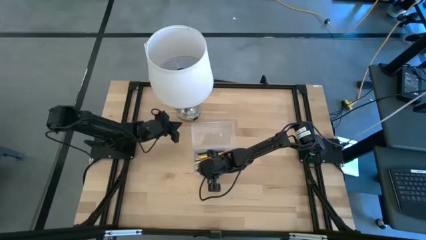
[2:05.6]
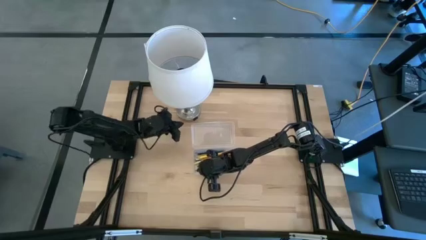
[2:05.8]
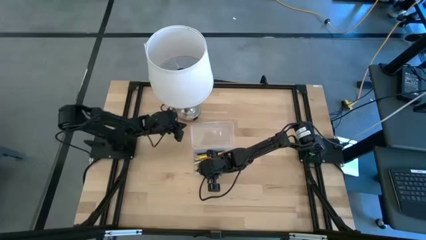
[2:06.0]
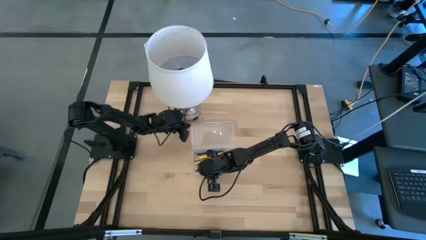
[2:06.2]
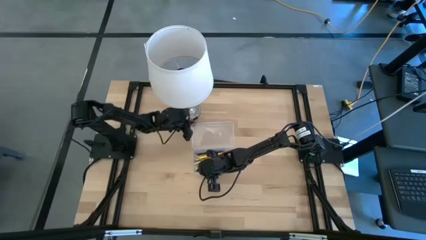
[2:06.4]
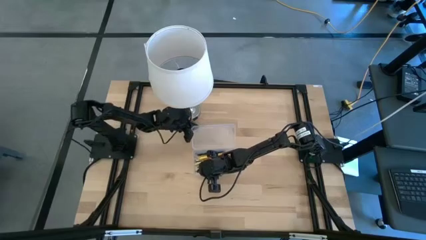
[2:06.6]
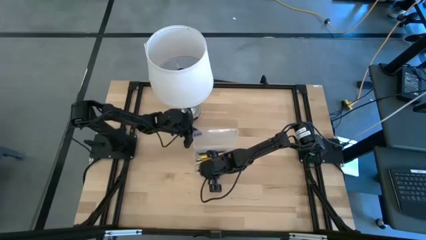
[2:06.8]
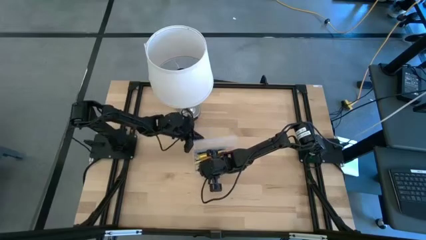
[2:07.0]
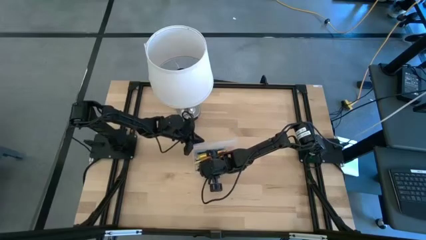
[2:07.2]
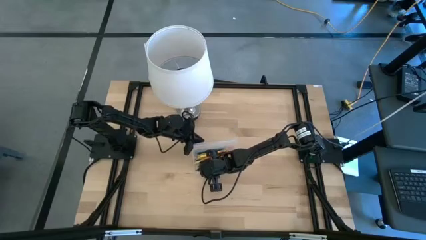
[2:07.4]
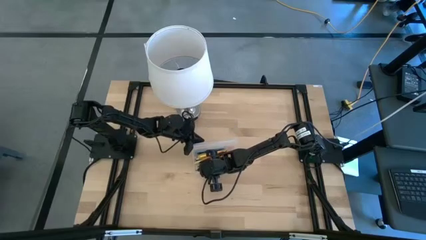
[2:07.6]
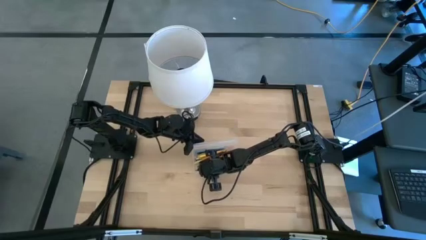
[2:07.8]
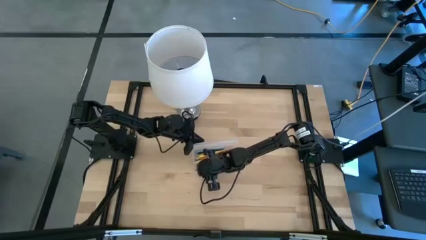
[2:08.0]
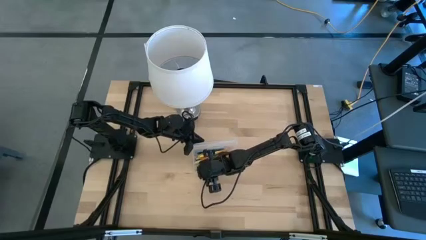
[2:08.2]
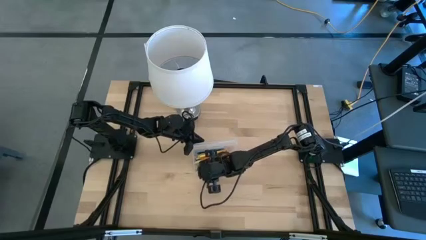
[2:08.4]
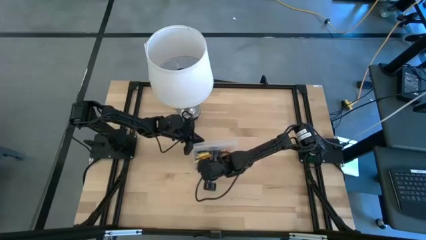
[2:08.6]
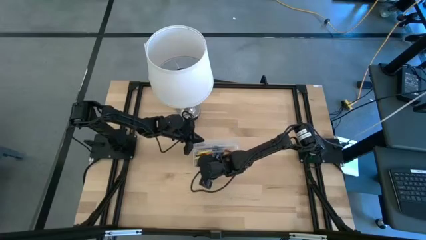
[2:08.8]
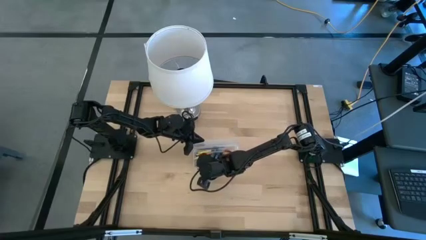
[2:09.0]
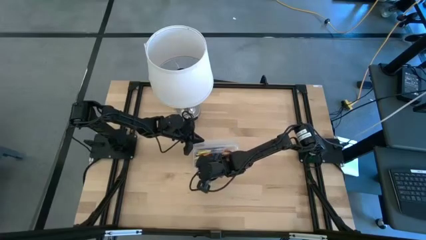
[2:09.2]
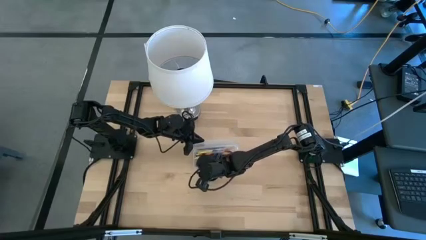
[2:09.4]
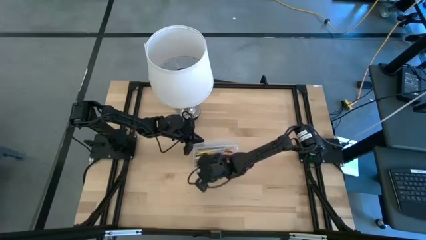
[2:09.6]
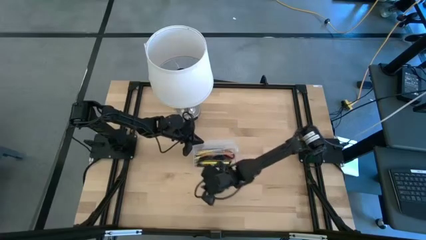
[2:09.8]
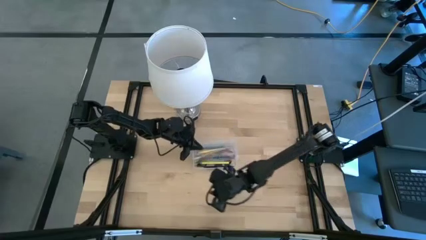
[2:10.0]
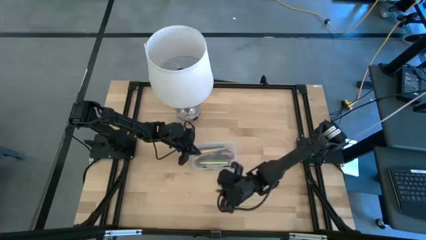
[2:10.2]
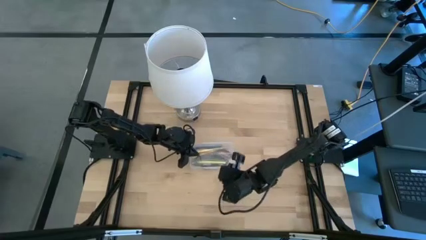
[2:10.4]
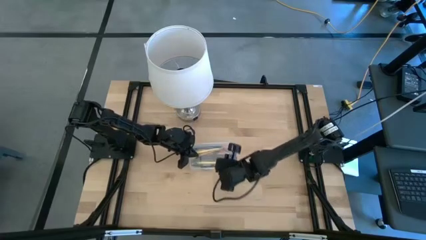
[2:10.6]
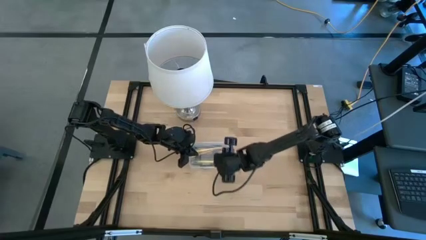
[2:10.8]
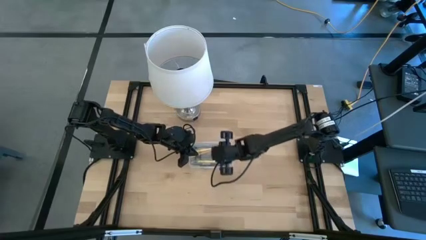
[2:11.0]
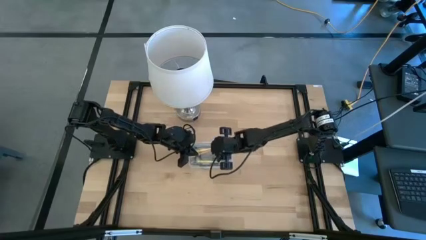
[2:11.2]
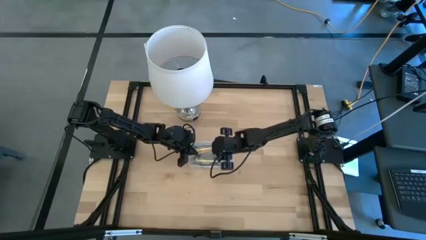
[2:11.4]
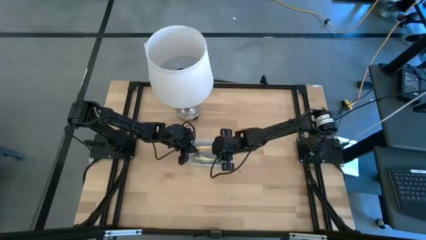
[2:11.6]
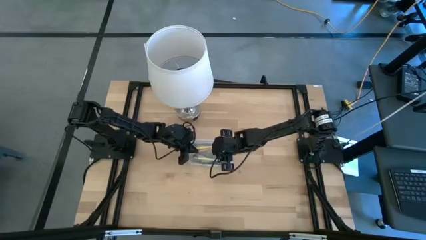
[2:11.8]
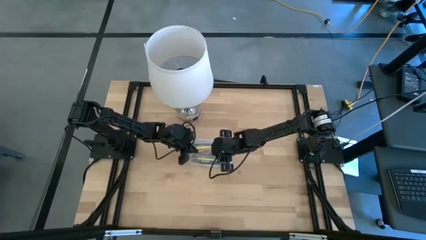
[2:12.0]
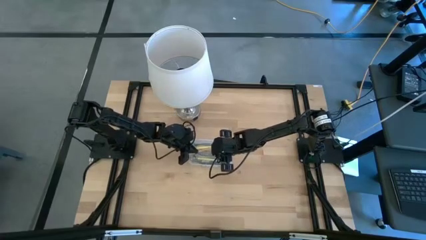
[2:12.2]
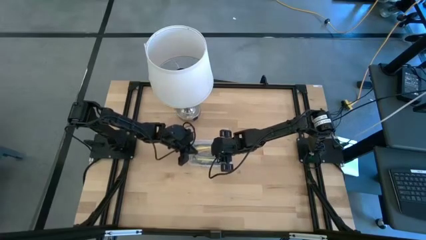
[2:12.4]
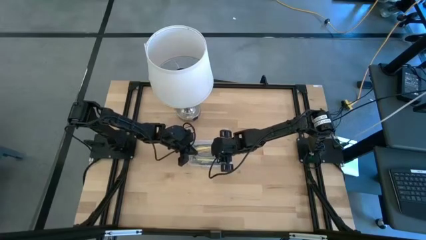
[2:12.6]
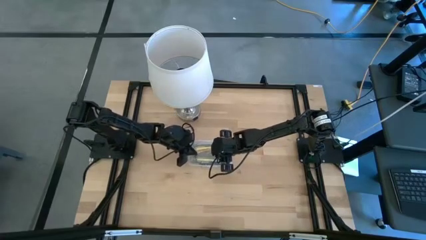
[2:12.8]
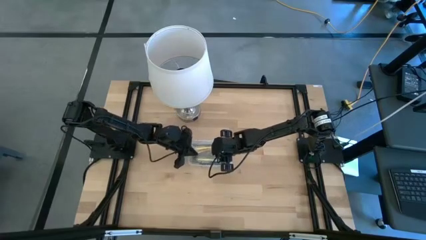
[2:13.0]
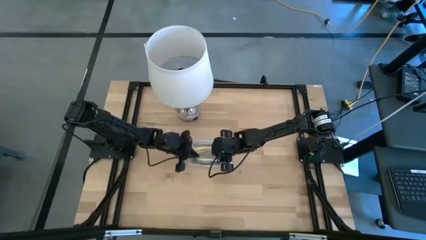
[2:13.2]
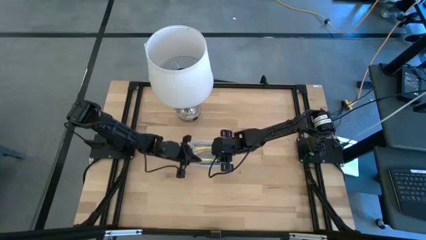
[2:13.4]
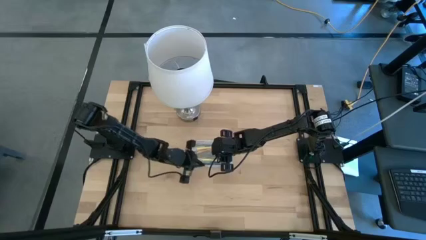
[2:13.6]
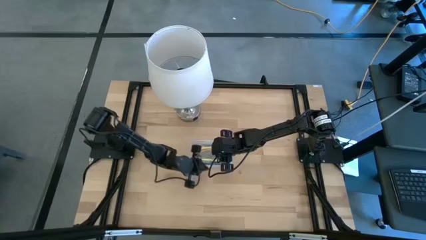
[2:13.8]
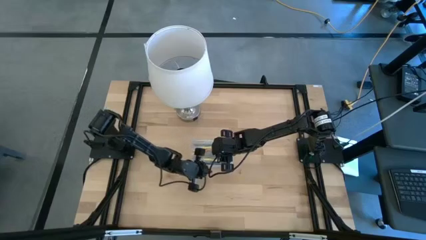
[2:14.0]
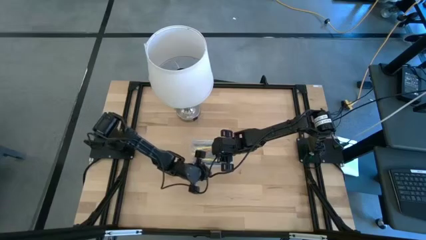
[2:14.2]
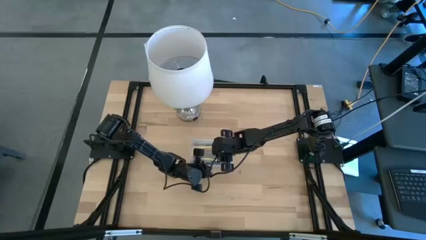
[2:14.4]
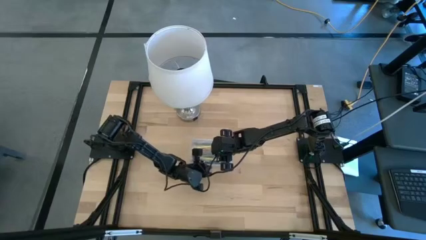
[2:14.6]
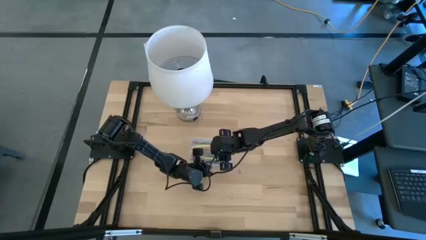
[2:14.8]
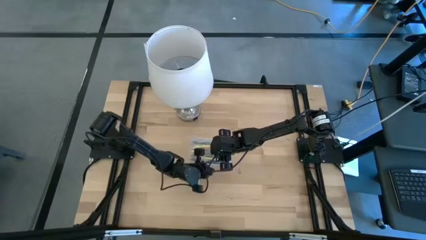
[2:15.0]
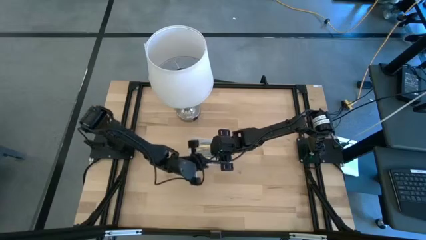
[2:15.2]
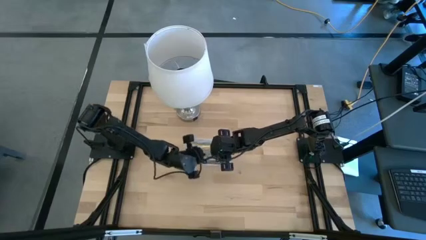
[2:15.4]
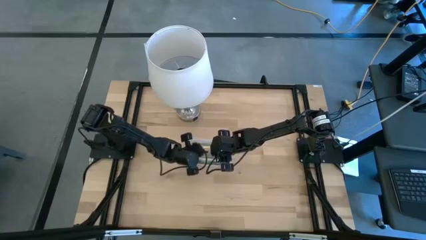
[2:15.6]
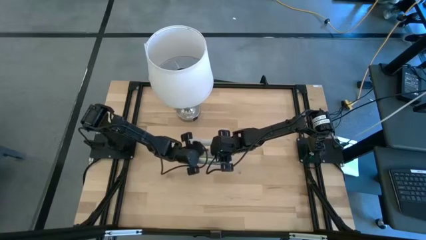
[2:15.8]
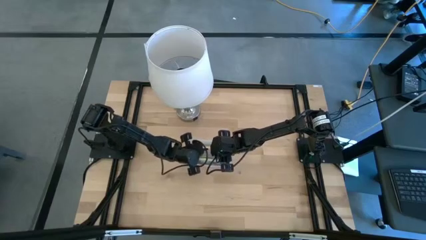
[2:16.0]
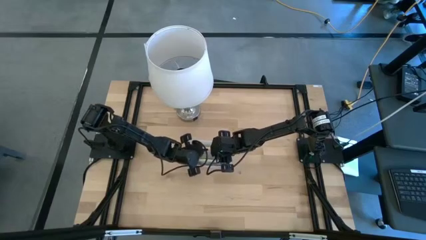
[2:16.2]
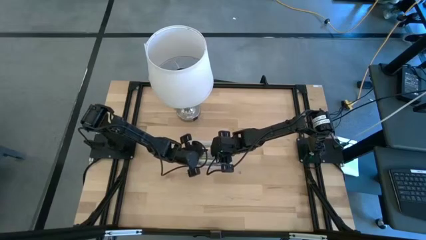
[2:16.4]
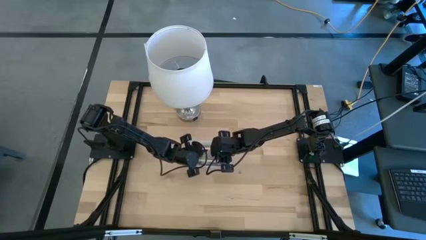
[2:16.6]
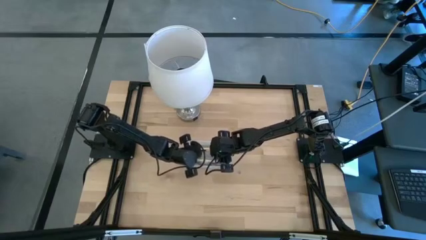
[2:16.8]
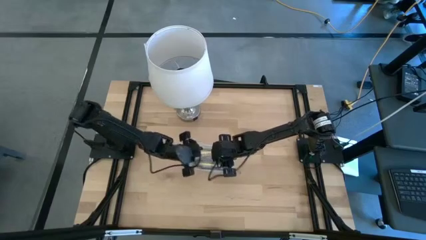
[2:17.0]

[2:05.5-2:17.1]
Task: Pick & place school supplies into a supply box
Close the transparent supply box

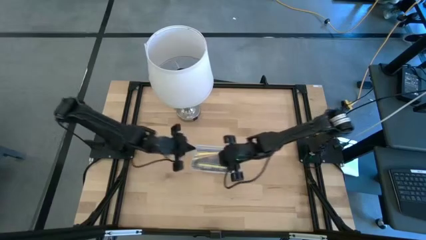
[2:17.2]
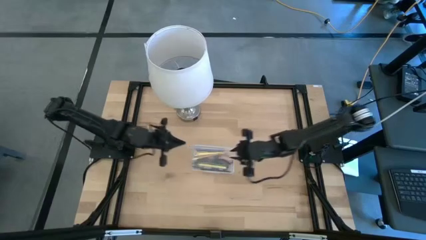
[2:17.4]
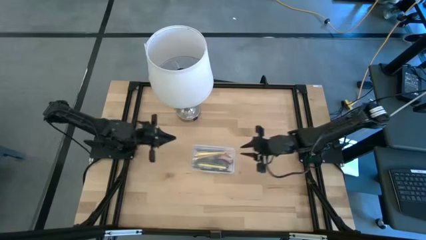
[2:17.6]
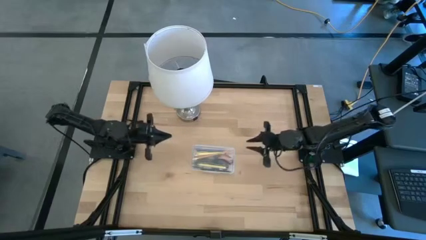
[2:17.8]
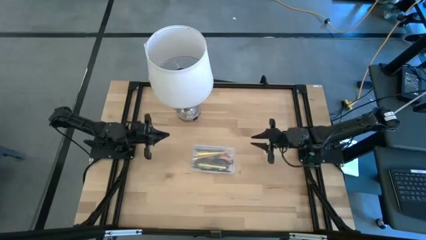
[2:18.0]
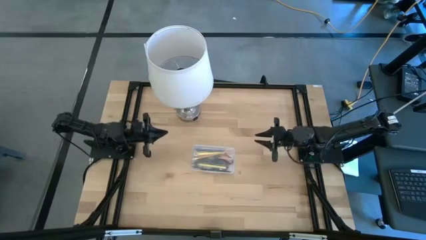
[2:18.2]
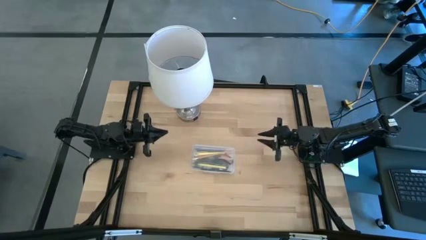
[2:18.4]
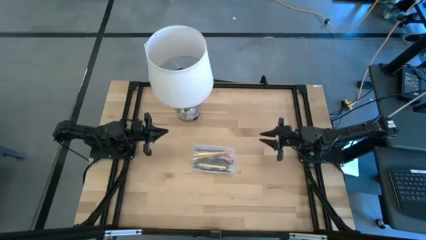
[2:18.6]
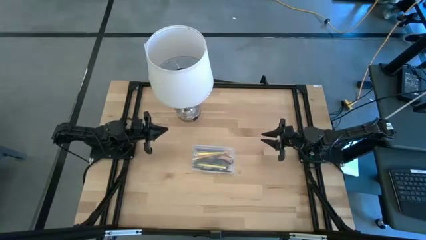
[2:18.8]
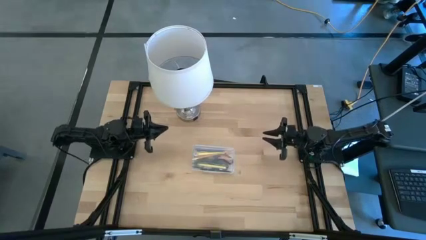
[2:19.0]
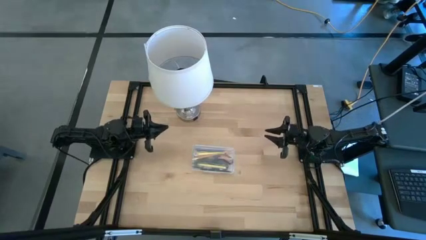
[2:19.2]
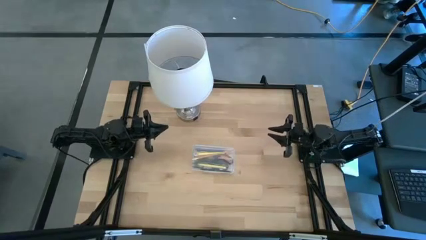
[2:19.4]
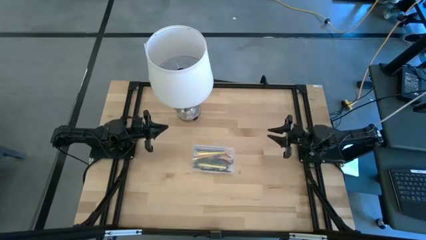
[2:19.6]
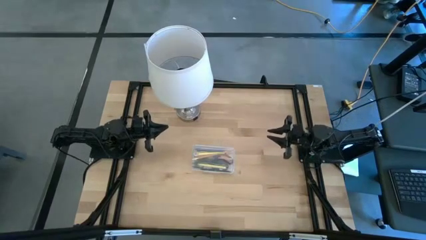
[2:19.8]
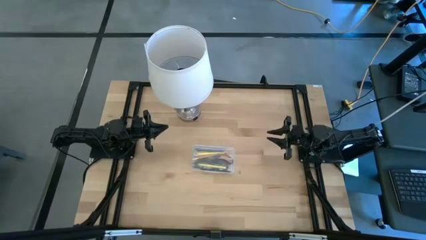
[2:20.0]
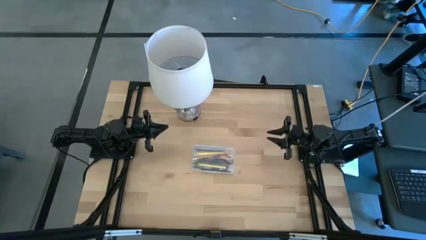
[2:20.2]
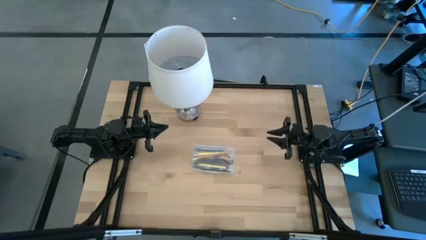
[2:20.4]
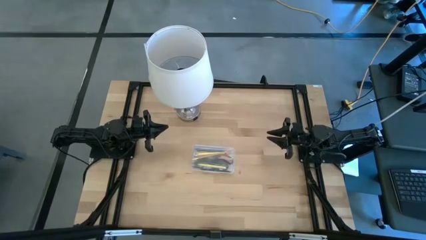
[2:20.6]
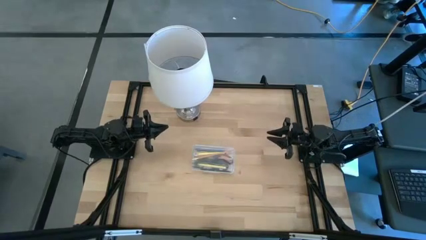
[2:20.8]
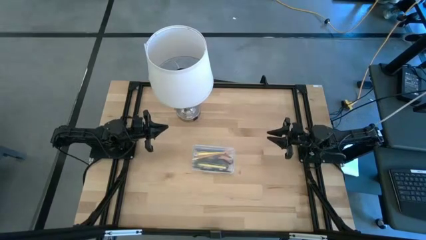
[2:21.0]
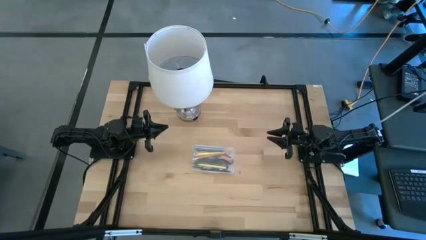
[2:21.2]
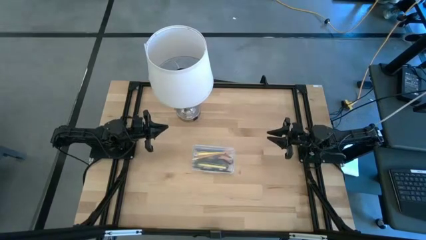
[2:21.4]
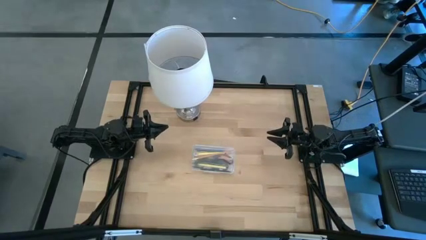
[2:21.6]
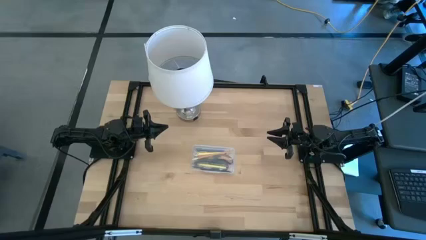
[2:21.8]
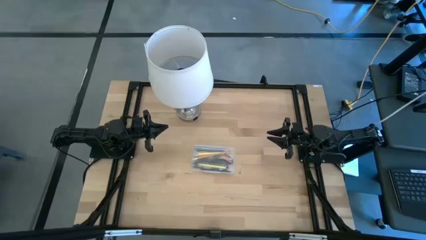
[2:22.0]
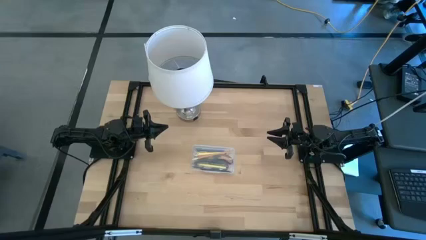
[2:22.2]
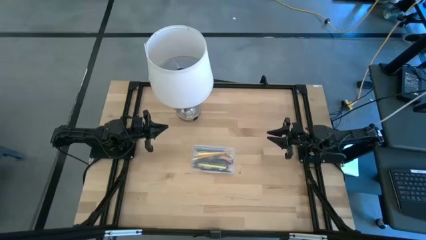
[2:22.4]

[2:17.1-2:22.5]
Return to Home Position

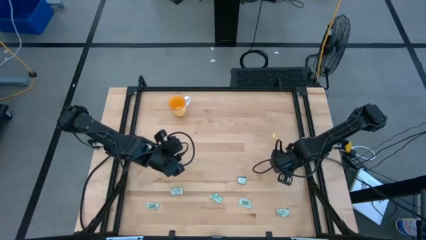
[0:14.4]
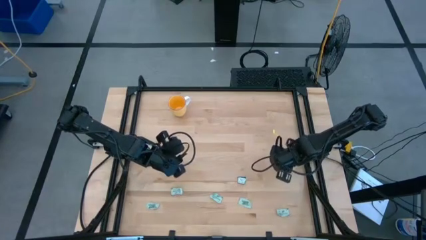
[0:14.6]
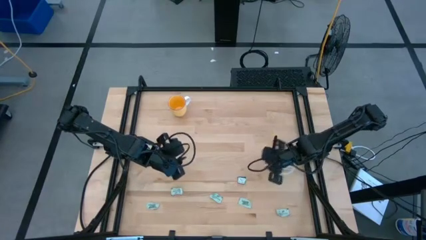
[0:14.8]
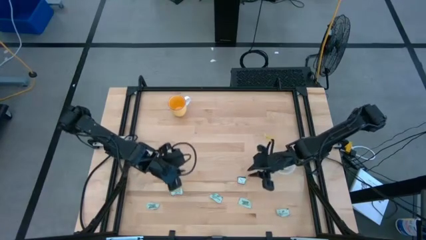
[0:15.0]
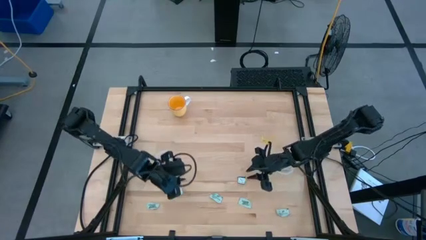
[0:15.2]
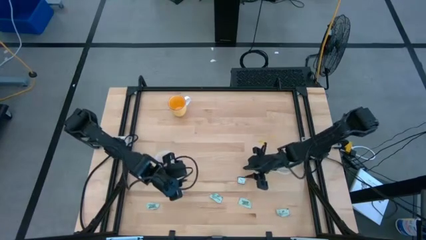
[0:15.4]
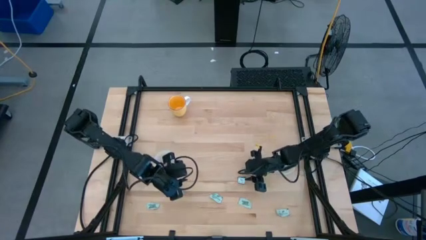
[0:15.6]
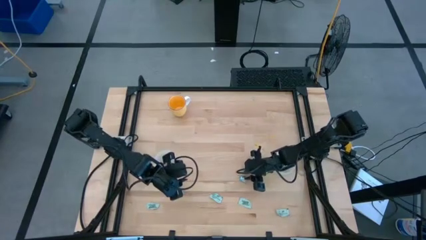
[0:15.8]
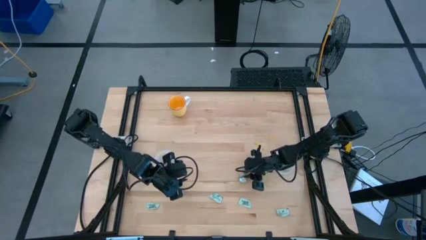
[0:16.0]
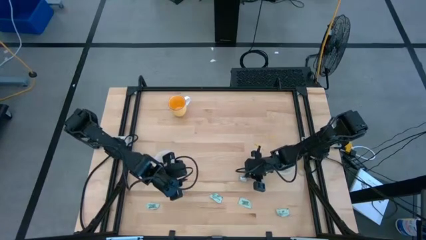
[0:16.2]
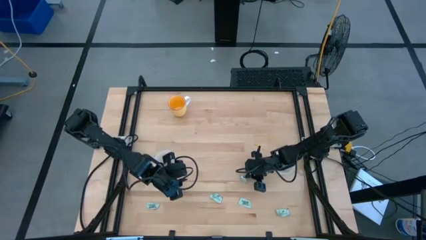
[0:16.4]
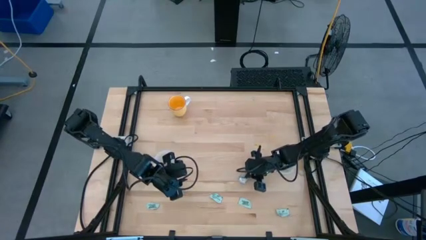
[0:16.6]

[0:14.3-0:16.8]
Task: Pick and place items into bin
Put the stevia packet into the right transparent bin
